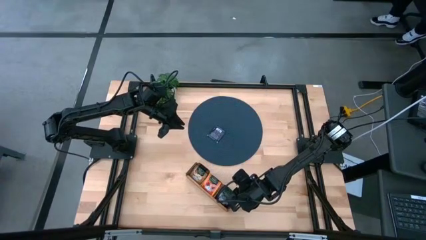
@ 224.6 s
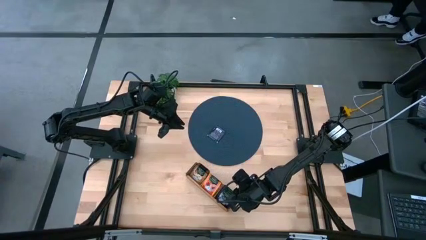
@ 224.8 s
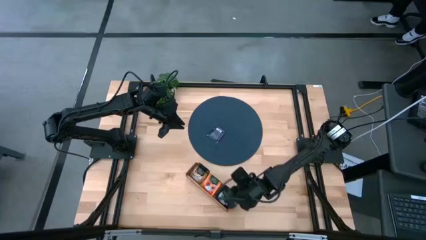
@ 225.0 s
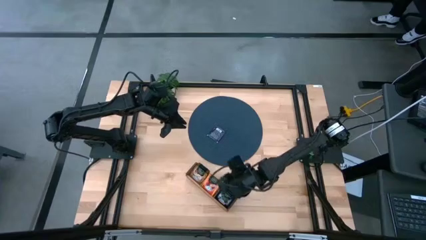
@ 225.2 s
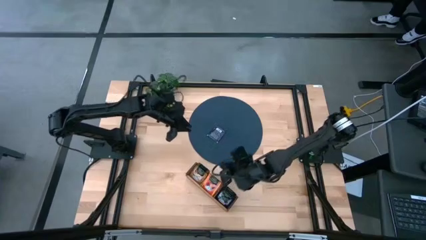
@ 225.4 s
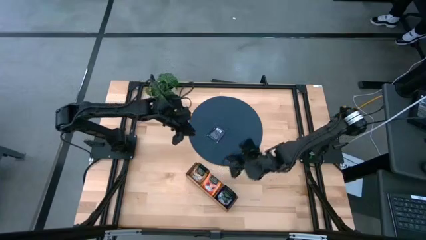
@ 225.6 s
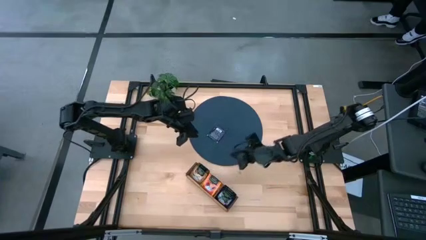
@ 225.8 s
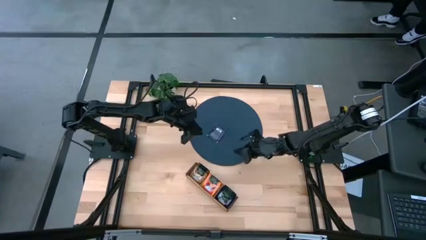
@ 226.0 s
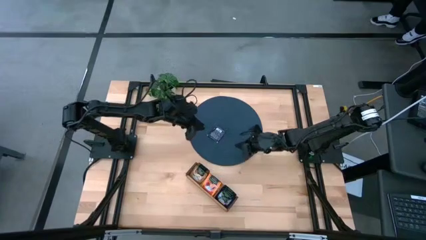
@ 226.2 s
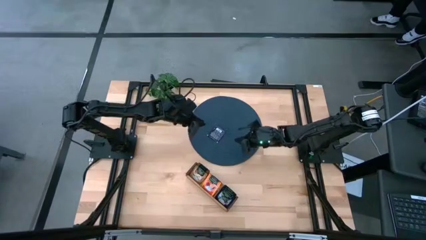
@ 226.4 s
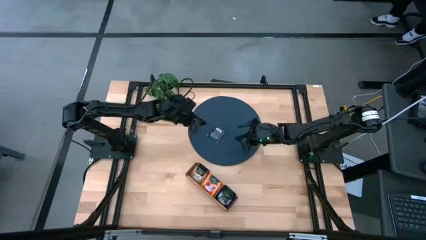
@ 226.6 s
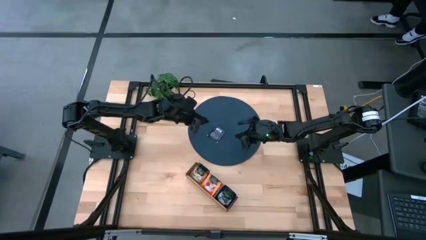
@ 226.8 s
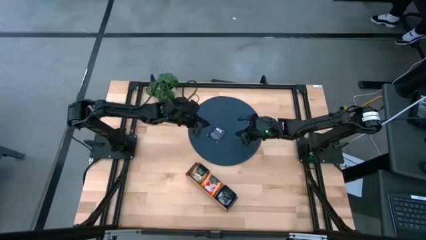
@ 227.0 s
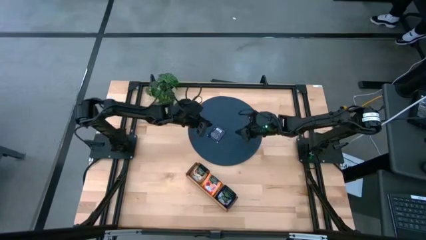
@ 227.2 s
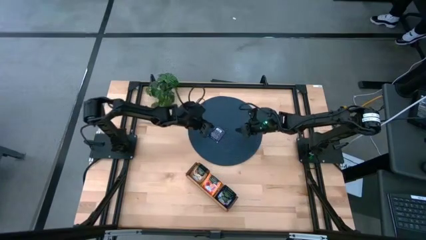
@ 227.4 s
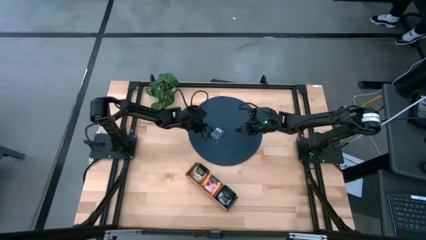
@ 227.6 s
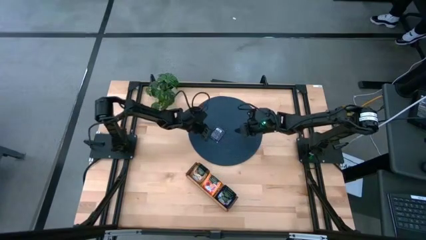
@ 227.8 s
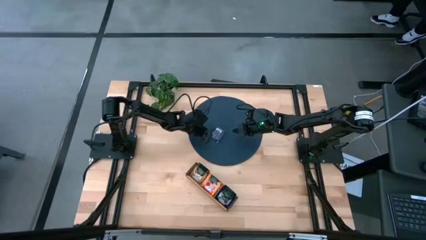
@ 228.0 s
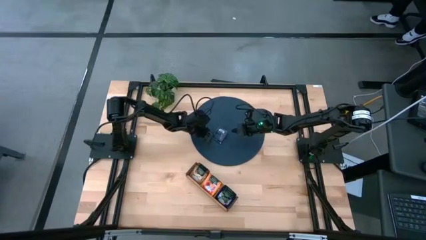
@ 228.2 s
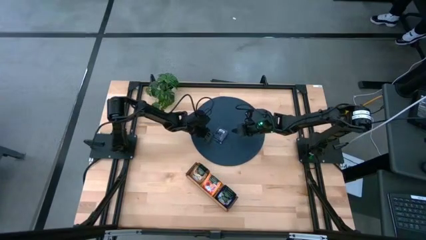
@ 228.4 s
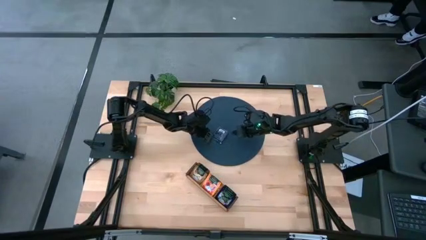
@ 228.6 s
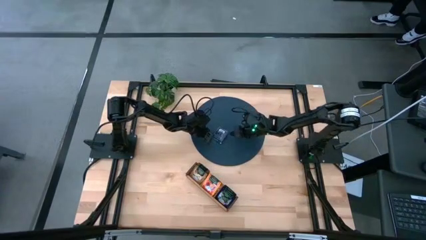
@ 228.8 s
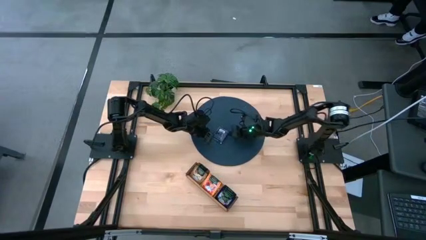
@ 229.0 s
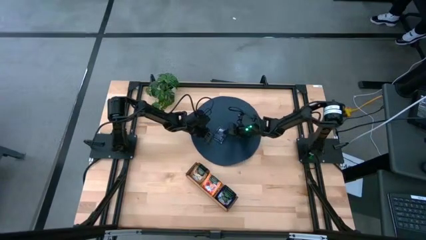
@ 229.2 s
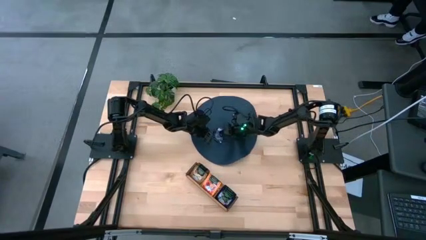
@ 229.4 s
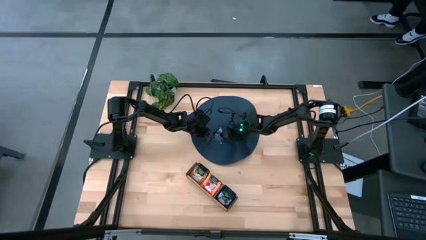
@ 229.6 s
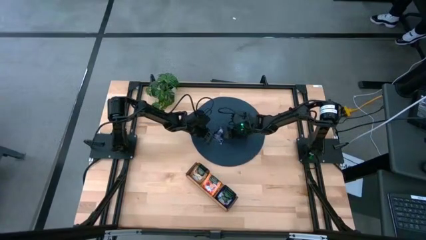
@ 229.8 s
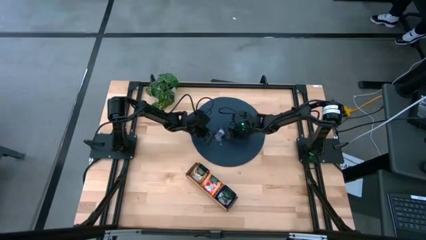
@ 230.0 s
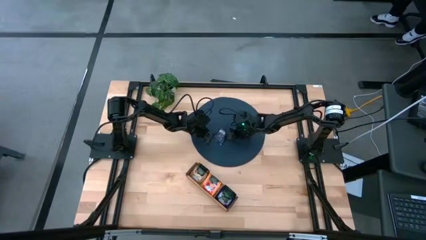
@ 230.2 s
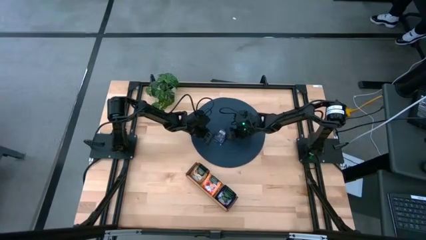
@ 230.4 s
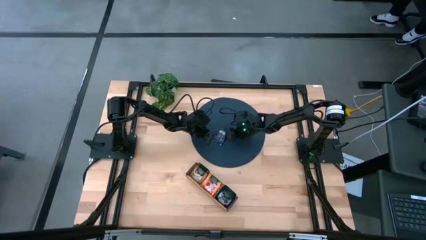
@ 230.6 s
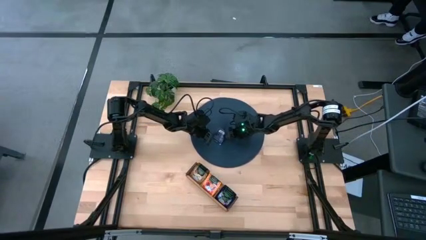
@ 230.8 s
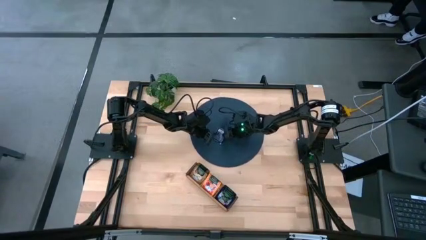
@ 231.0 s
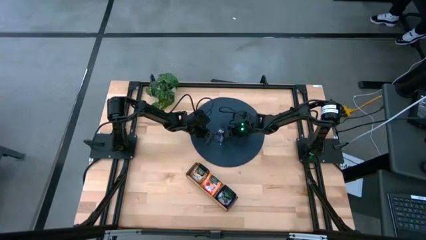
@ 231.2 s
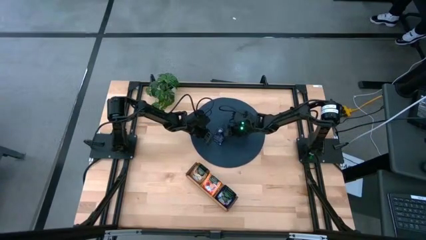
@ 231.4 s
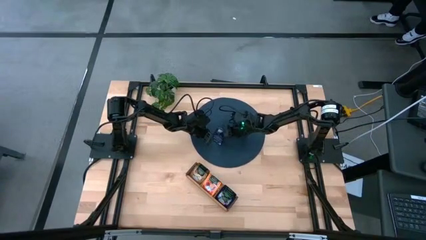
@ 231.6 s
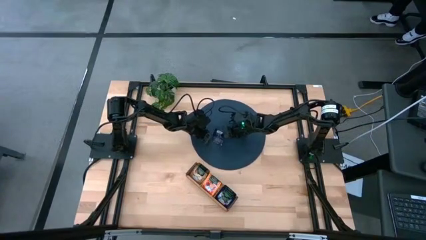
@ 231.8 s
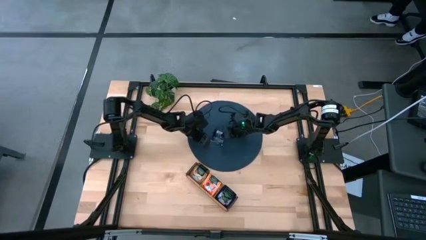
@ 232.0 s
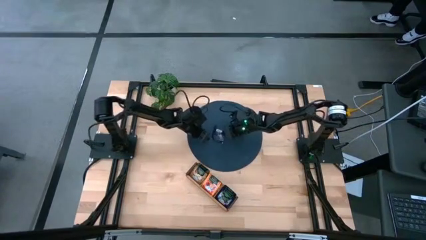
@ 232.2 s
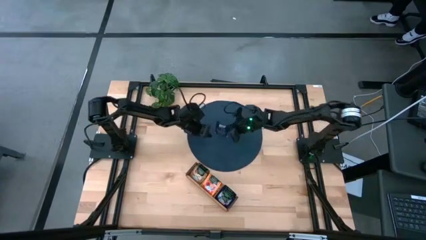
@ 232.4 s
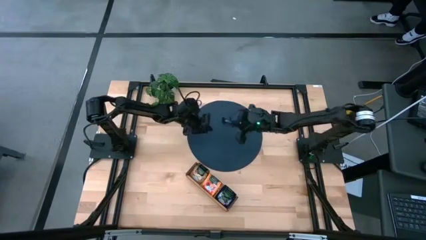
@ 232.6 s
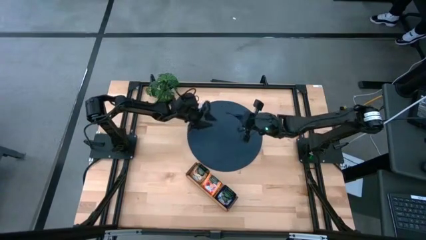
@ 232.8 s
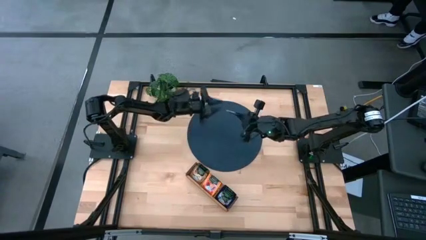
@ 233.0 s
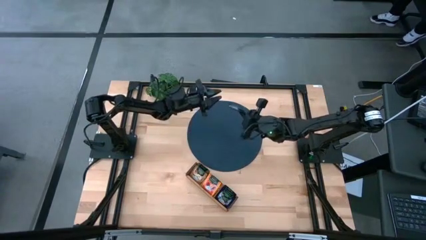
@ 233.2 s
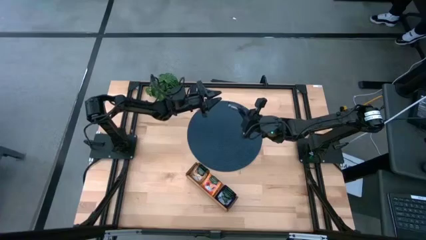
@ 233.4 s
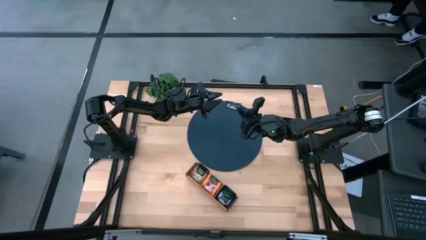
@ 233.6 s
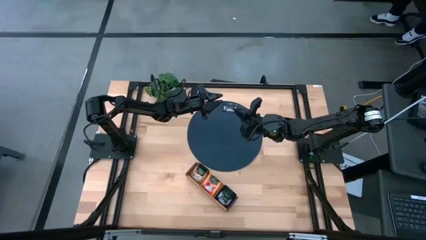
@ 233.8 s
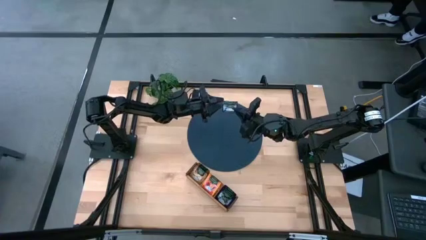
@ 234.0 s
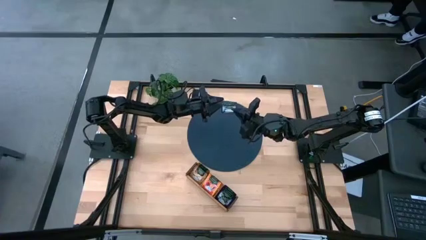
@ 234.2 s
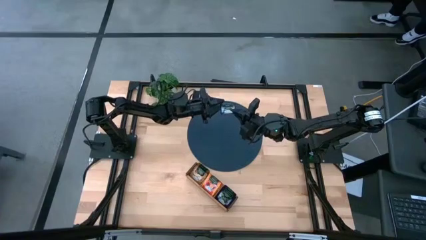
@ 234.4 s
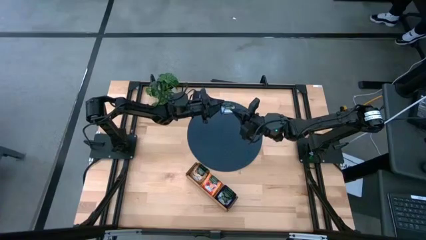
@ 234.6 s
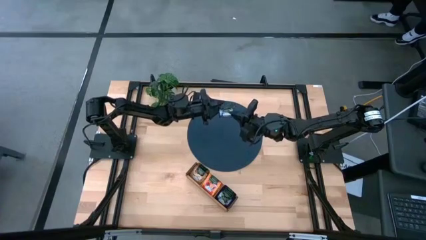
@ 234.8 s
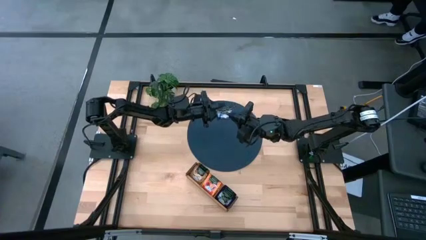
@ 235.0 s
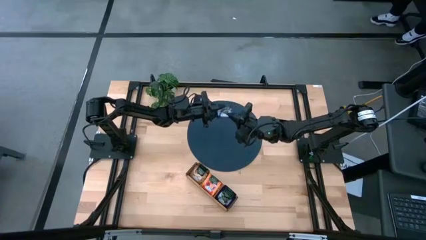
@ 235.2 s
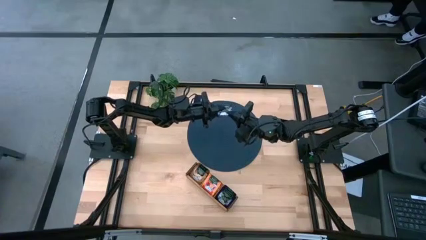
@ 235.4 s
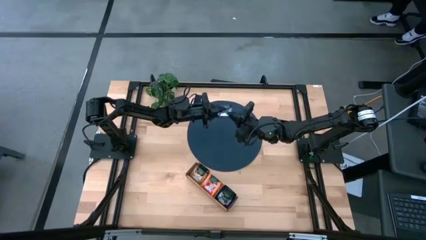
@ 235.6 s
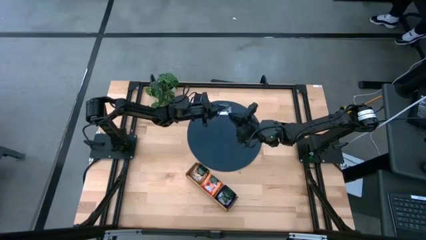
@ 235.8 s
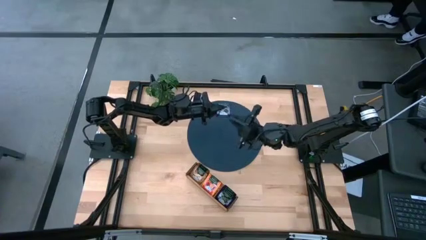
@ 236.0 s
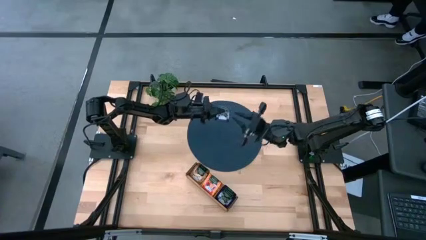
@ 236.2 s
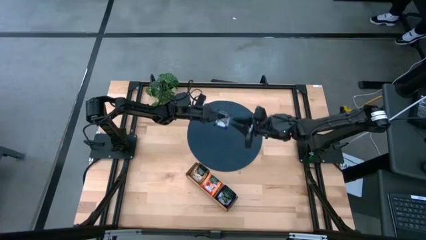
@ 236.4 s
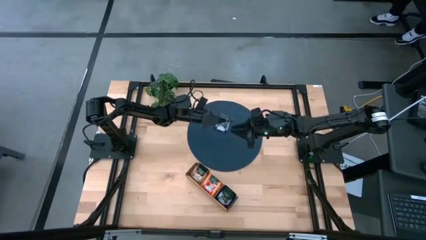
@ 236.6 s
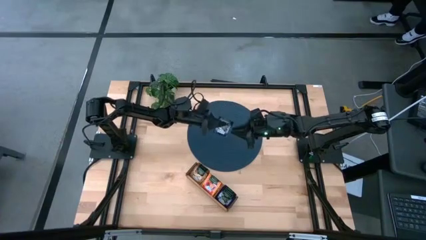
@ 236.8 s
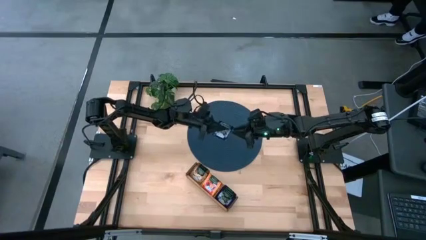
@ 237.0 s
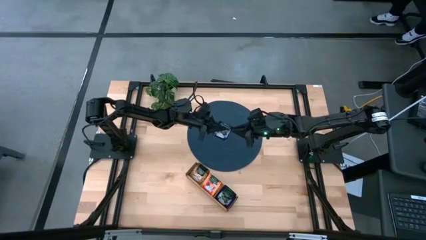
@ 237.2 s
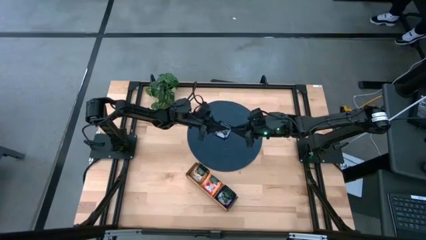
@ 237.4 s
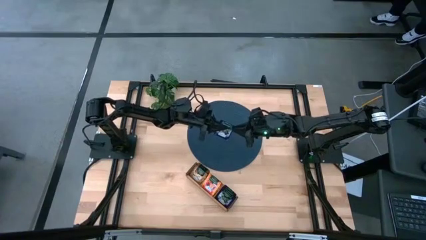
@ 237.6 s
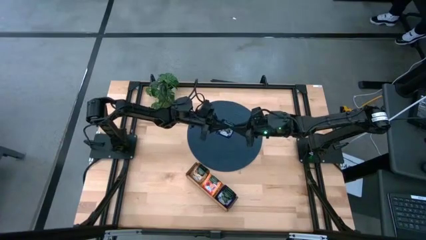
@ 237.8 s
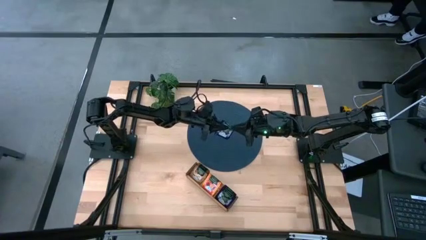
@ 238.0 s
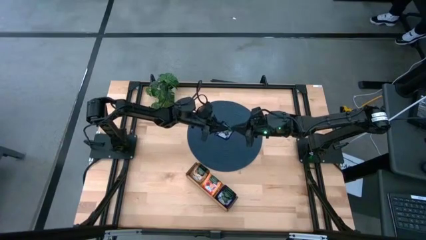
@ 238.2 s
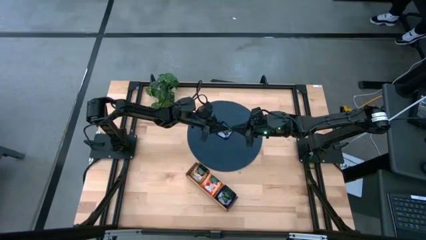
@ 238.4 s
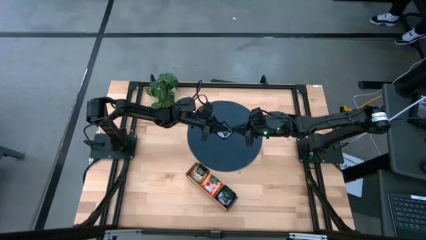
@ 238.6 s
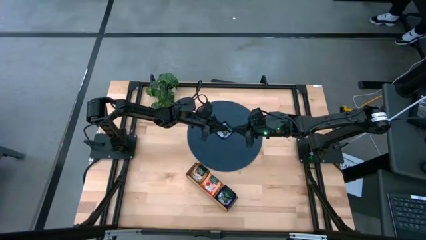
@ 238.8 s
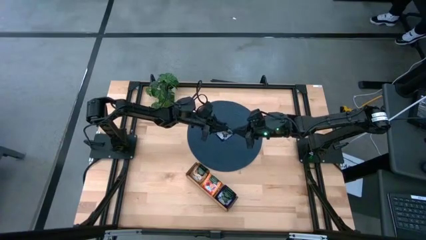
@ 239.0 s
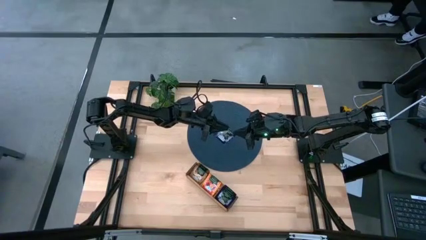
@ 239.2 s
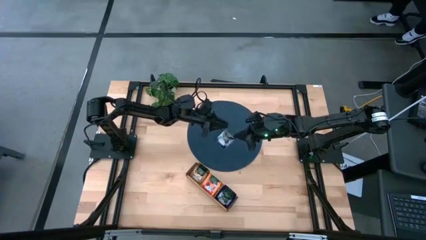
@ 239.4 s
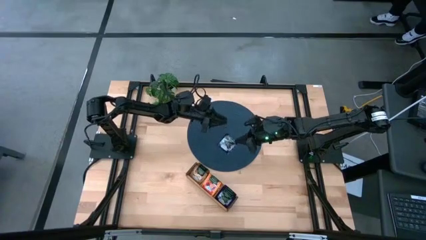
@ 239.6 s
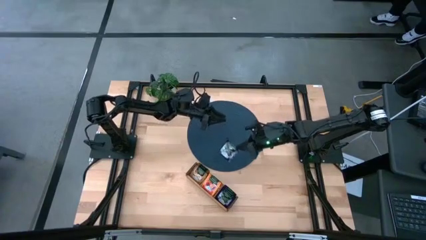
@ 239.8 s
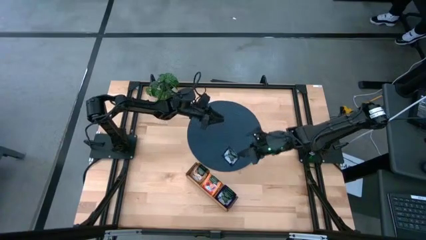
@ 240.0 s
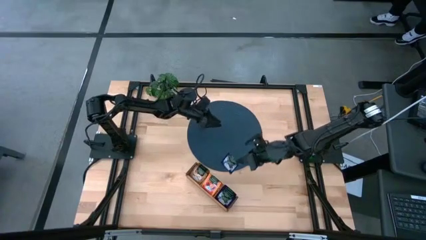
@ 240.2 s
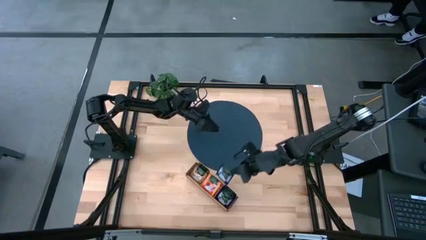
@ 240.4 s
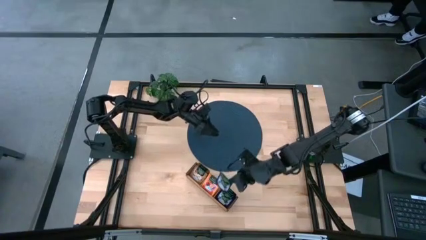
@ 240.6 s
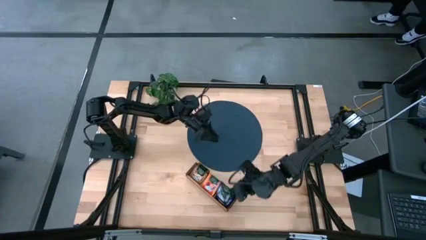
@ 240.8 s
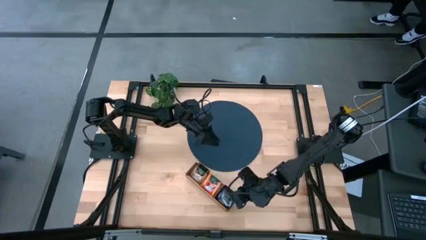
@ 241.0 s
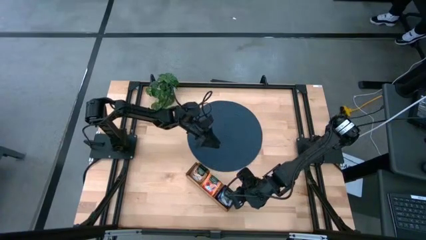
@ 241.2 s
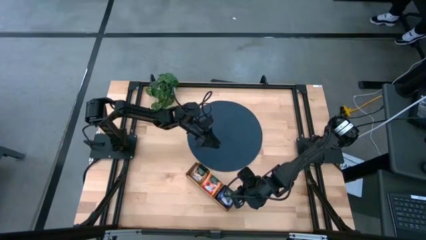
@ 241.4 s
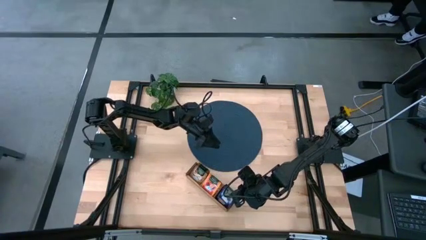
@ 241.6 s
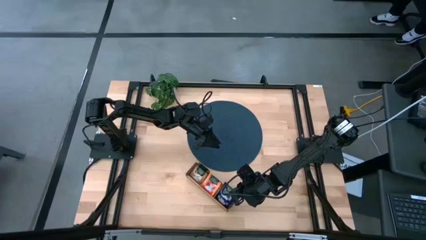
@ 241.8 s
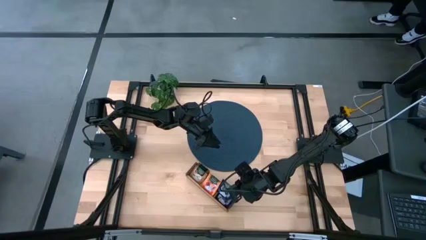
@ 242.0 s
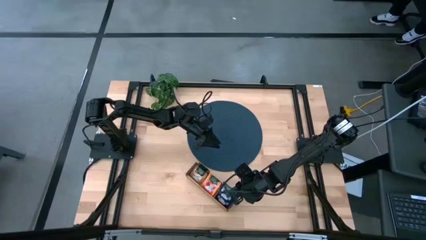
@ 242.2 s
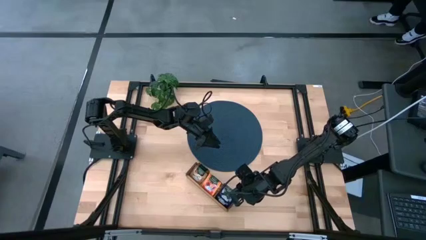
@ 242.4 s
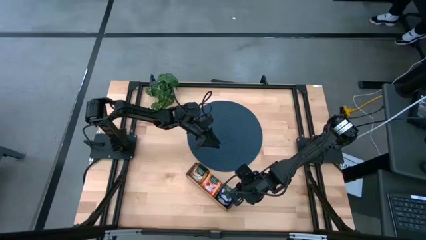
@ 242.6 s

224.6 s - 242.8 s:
Task: Pick & Place Tea
Put the violet tea bag into the right section of the wooden organizer
